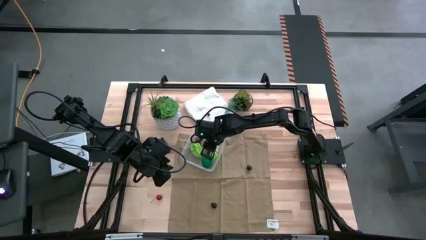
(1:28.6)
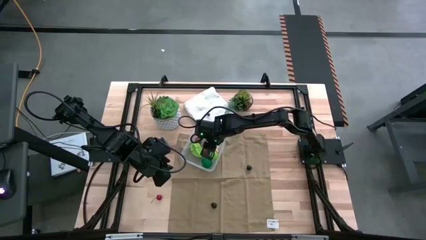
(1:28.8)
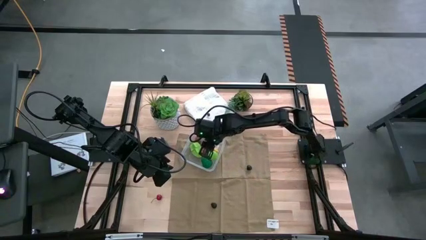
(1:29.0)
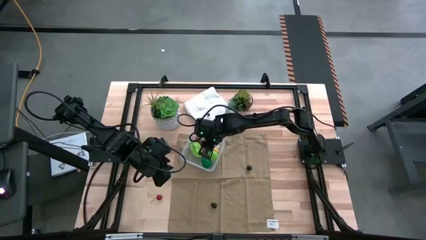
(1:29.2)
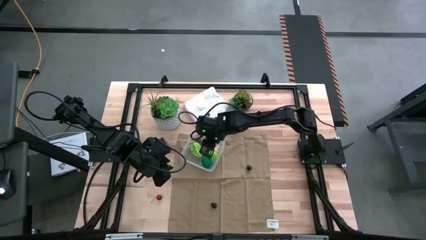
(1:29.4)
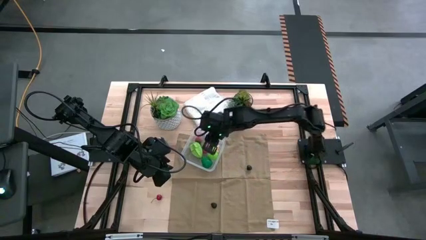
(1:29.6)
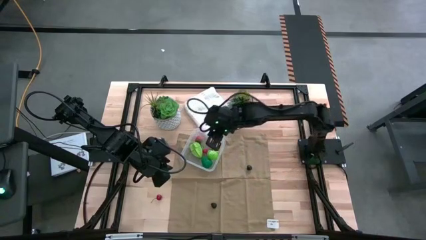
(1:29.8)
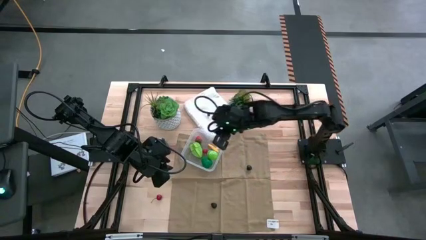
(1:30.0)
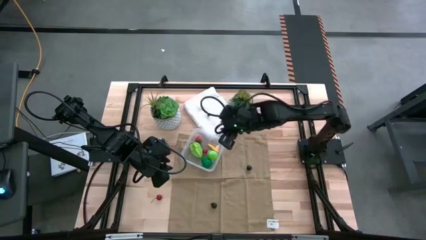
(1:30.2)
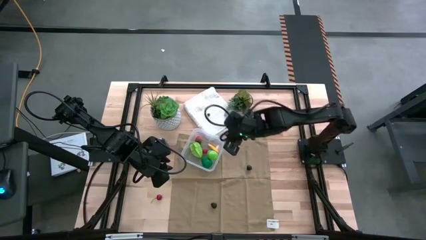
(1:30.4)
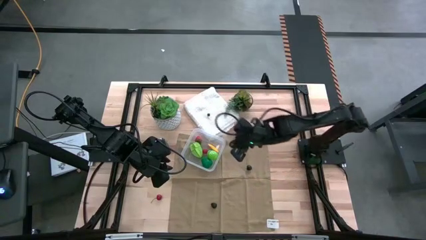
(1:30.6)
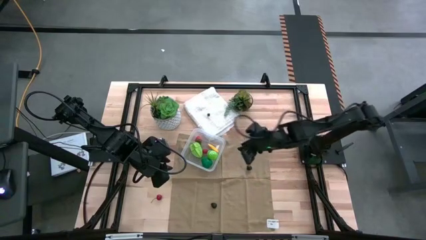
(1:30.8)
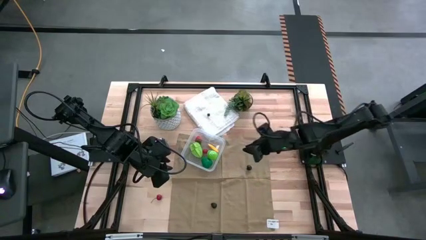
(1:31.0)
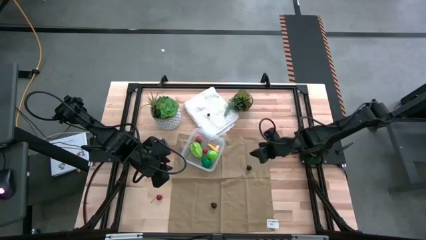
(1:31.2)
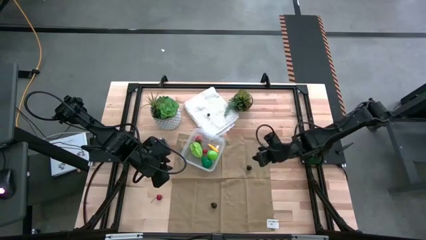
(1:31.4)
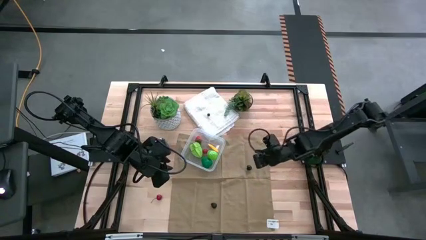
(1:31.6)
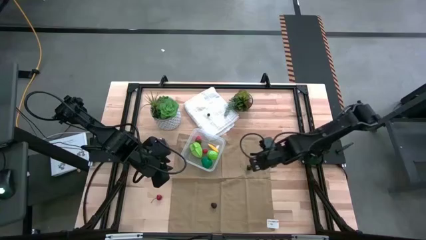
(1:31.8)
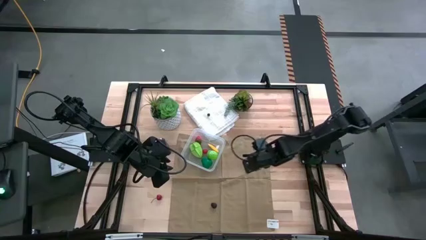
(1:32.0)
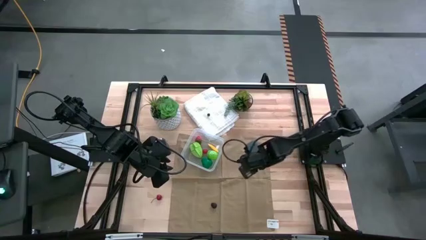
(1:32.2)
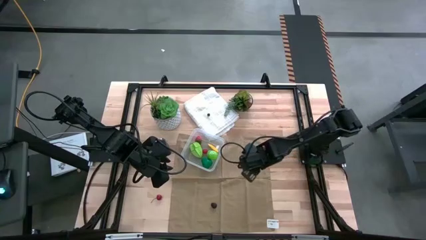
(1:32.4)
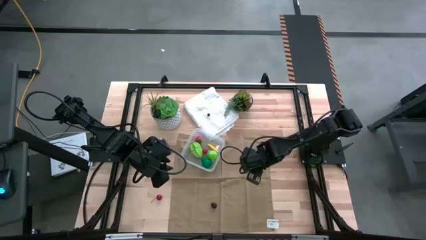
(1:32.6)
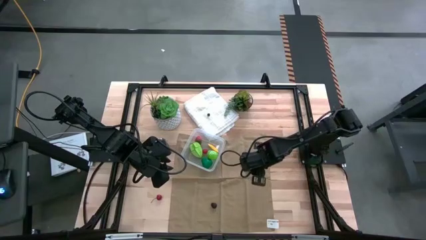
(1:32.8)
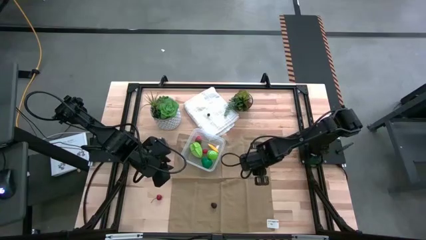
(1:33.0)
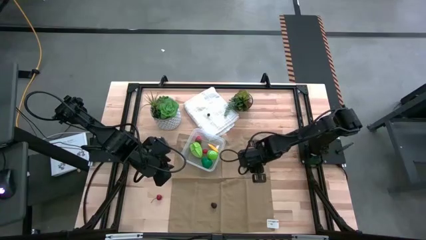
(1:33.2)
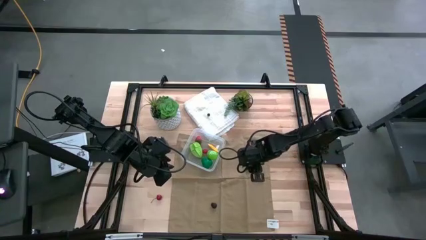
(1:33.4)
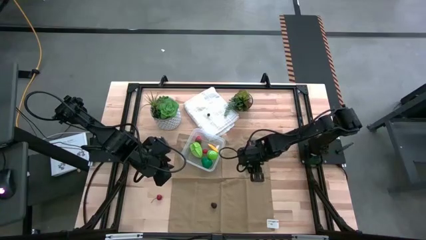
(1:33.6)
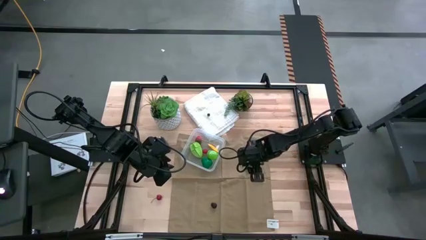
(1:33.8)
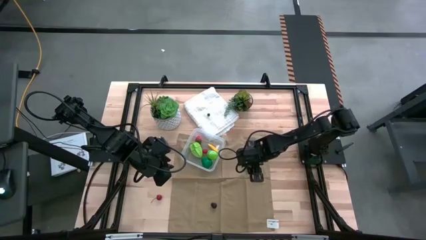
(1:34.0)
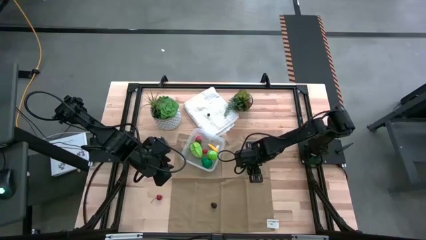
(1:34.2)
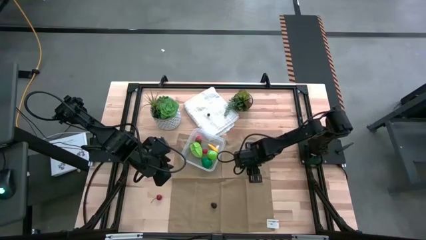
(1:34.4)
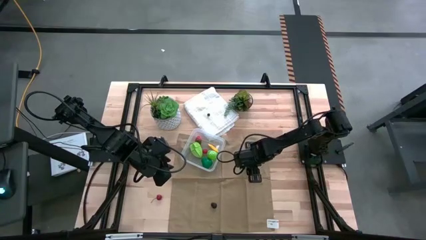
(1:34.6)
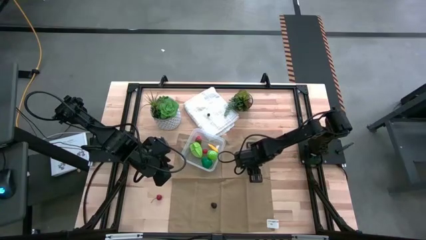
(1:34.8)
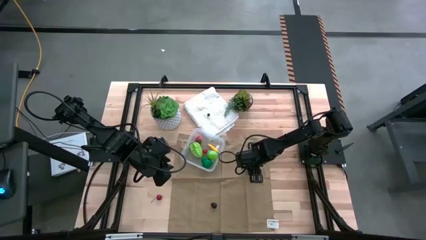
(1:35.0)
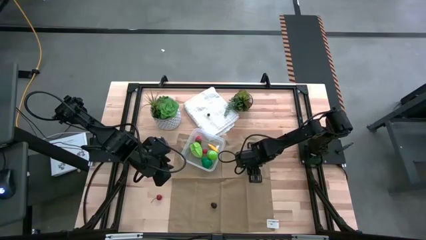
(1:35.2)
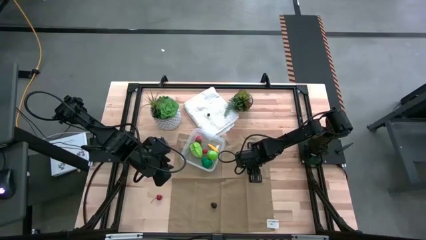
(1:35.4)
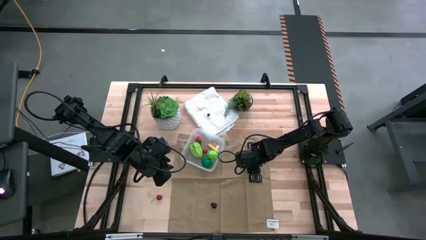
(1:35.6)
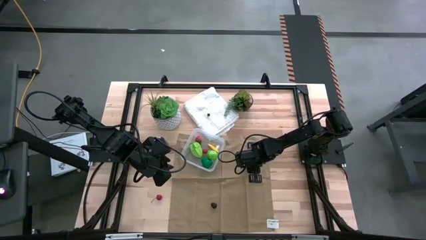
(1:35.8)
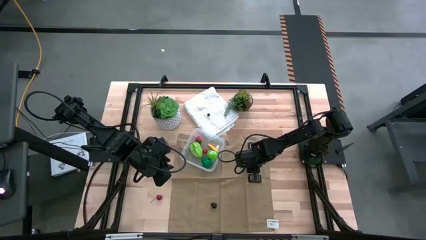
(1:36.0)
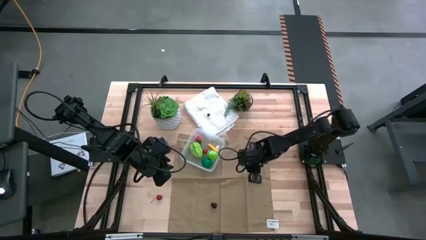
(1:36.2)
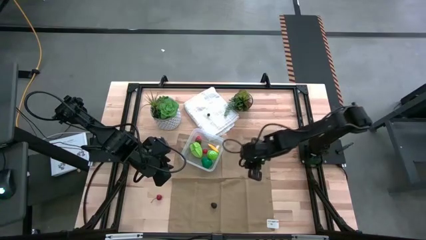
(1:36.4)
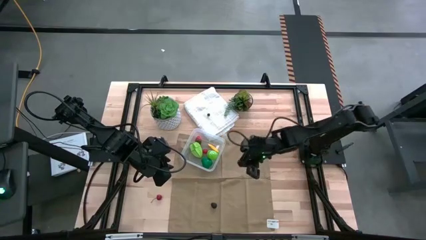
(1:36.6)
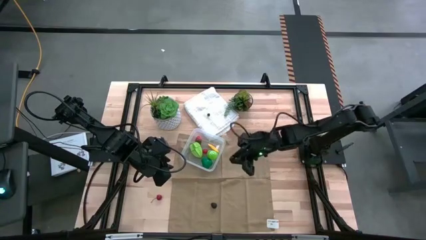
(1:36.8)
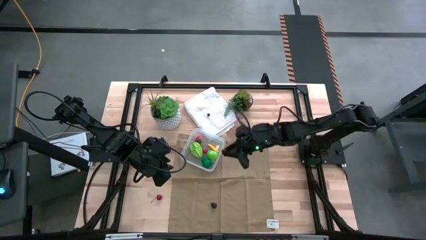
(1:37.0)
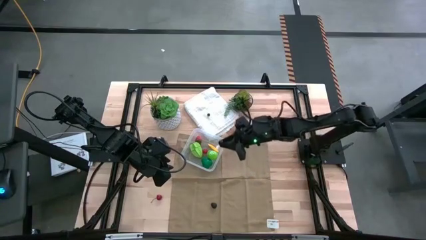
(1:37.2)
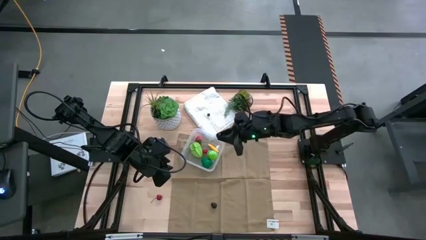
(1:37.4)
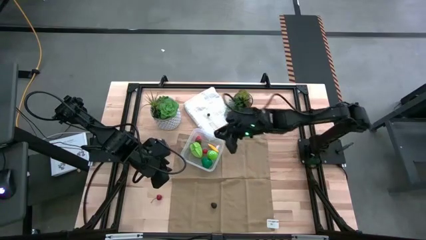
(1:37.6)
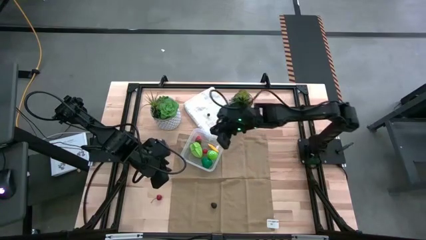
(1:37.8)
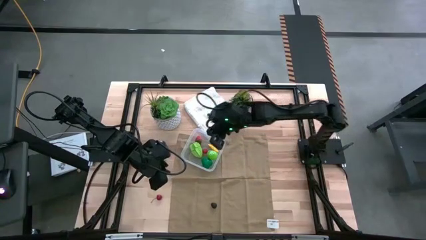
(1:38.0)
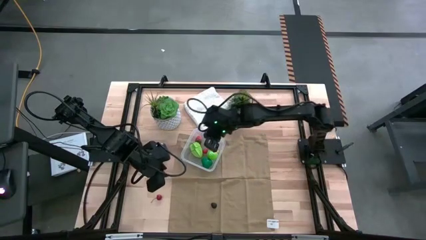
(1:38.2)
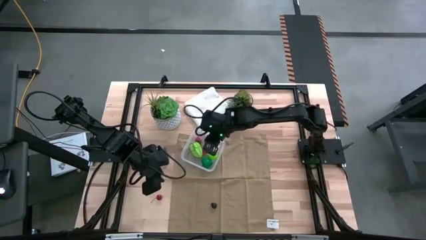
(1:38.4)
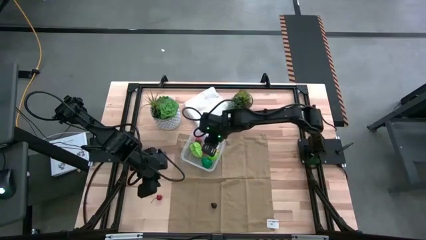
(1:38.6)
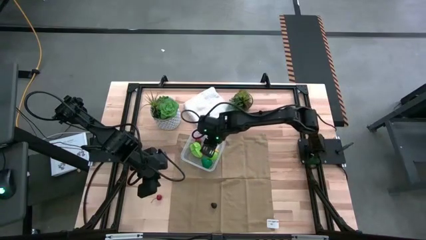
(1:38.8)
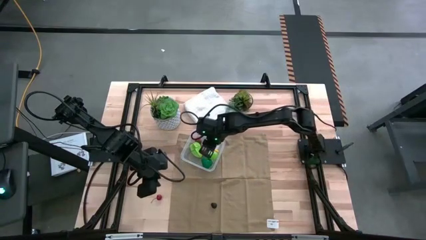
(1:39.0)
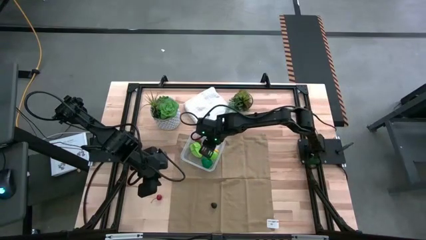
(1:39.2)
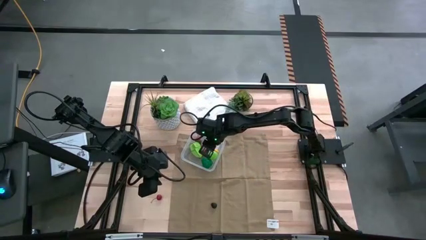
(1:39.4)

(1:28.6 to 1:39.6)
Task: Pick and placing Produce into tupperware
Put the black cherry into transparent bin
